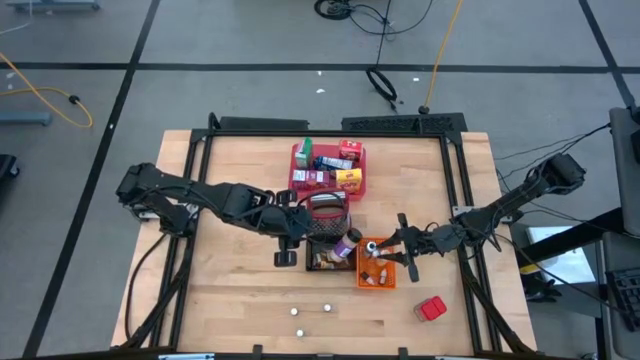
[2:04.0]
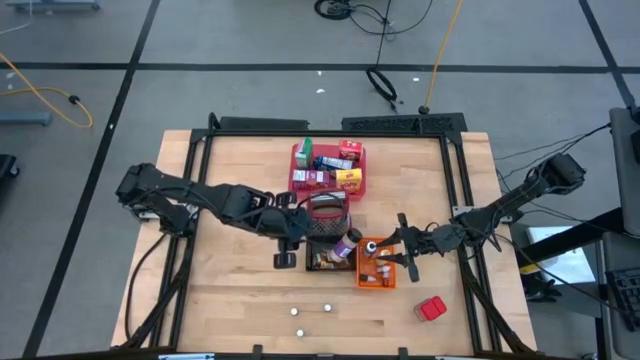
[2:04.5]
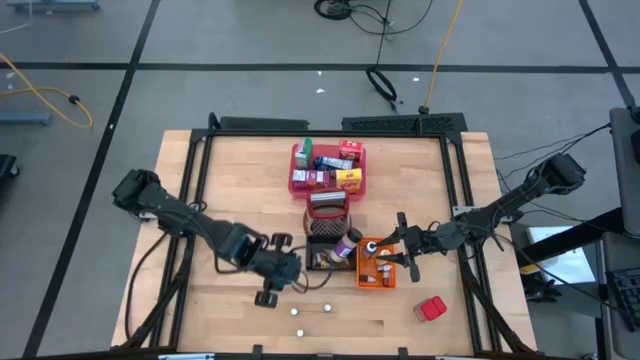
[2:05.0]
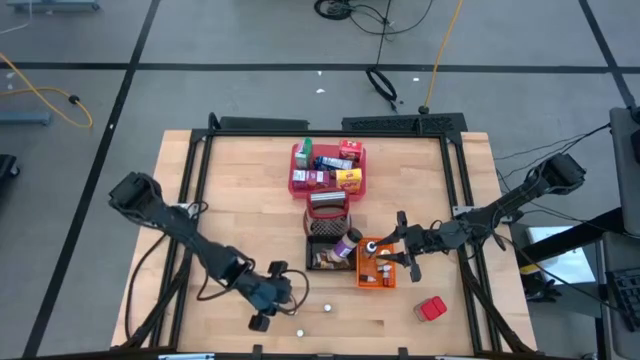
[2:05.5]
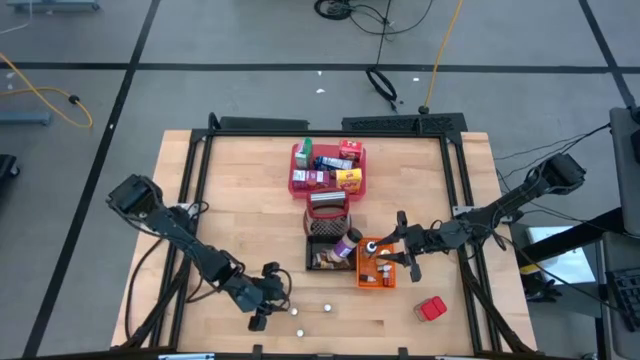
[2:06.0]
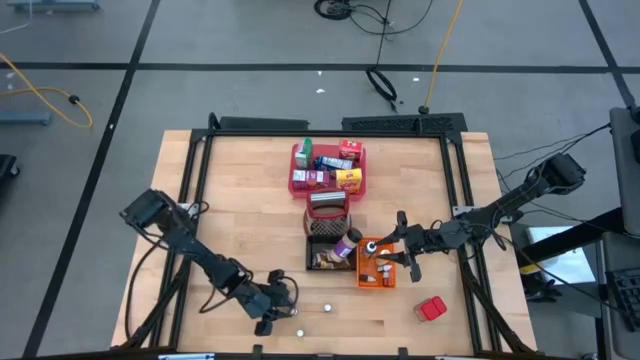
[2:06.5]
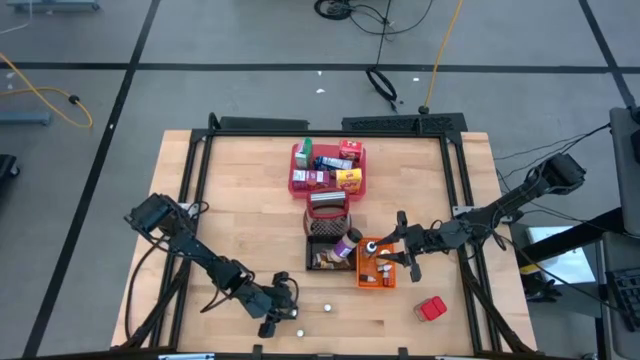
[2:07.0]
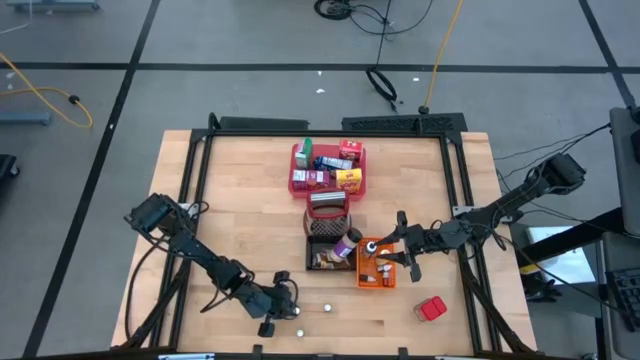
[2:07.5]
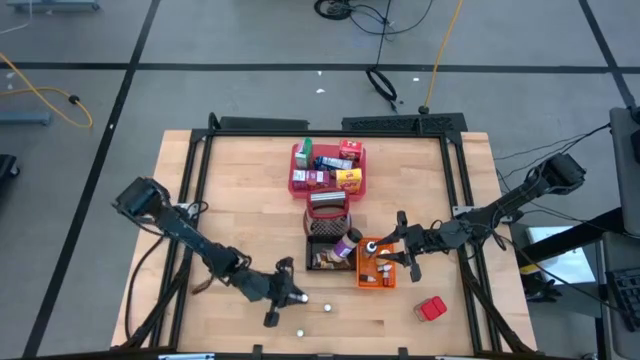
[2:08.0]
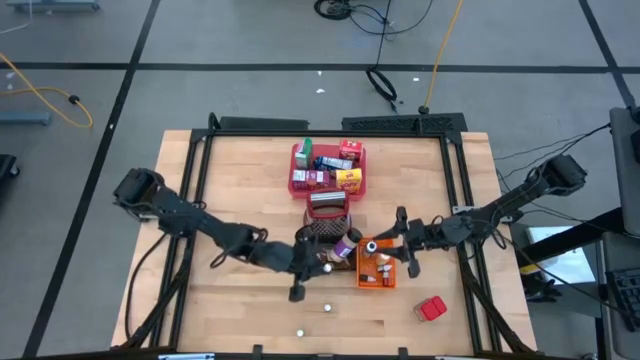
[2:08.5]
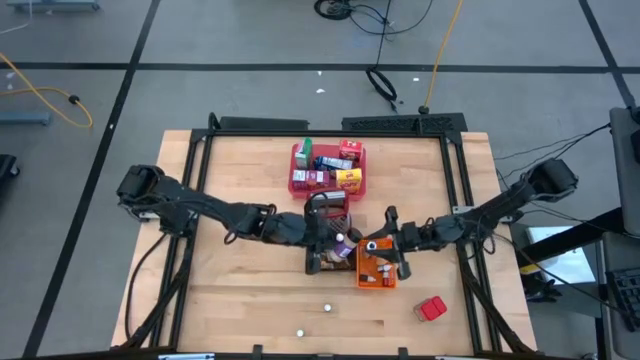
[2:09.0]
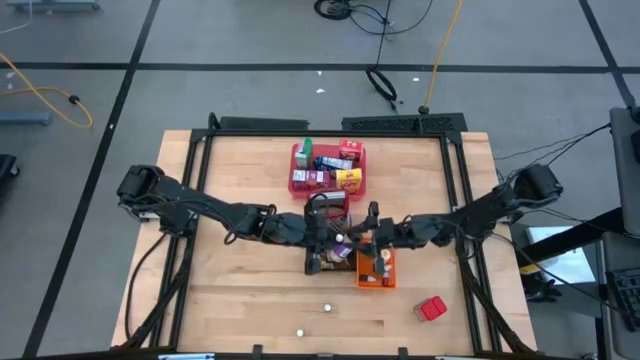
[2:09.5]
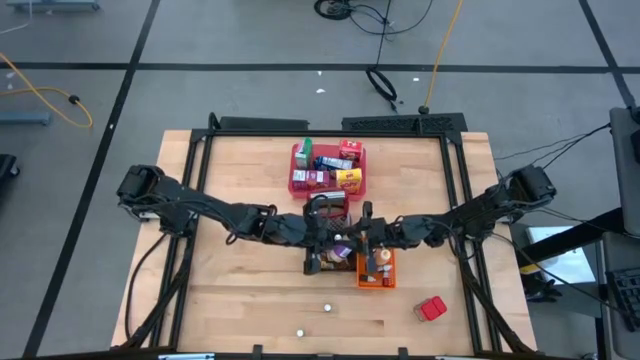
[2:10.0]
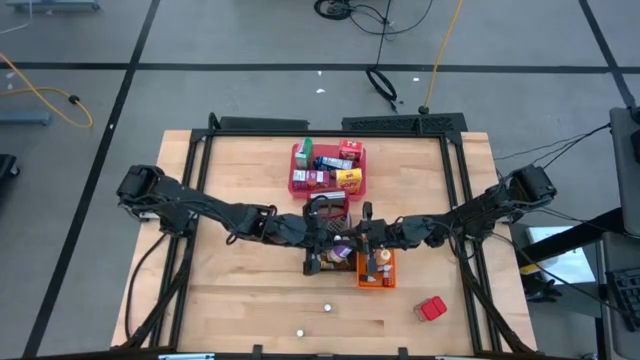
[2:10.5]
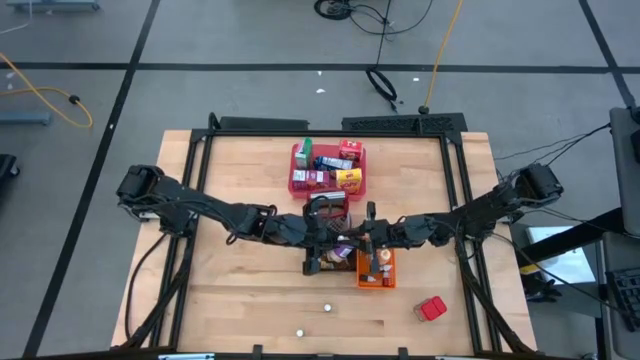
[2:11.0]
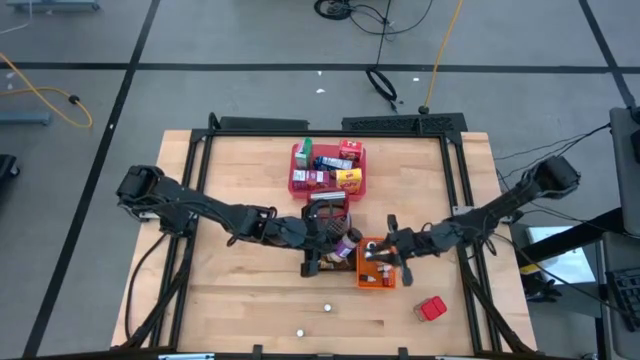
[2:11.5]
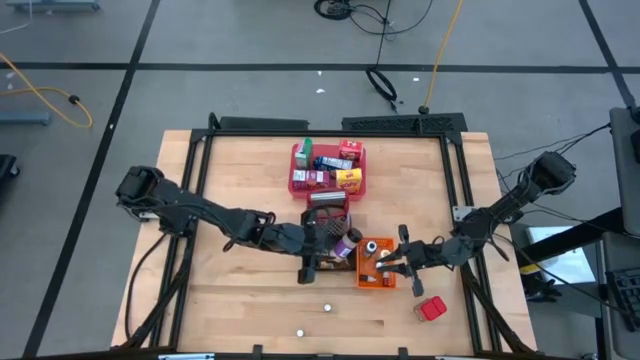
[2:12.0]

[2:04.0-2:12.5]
Task: Pick & Place Kitchen Items
Put the orange food coloring bottle into the orange bin

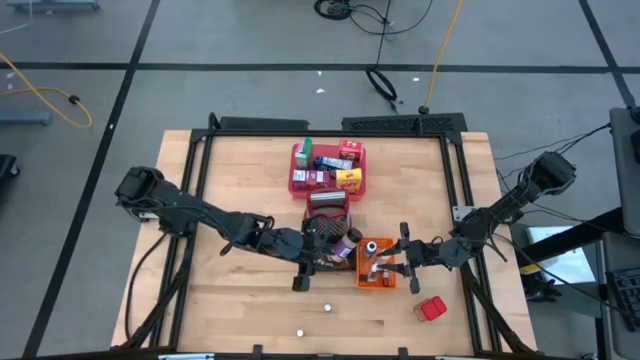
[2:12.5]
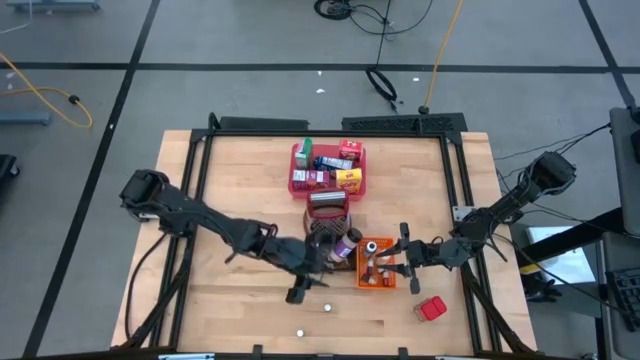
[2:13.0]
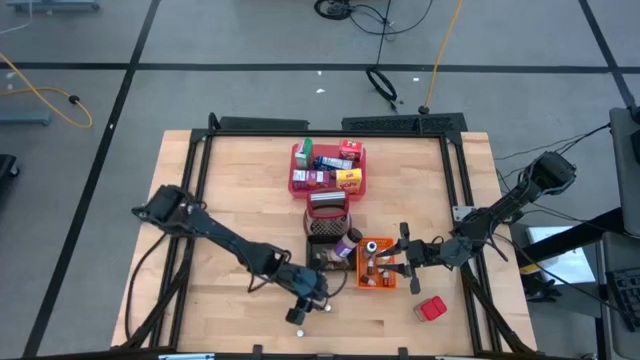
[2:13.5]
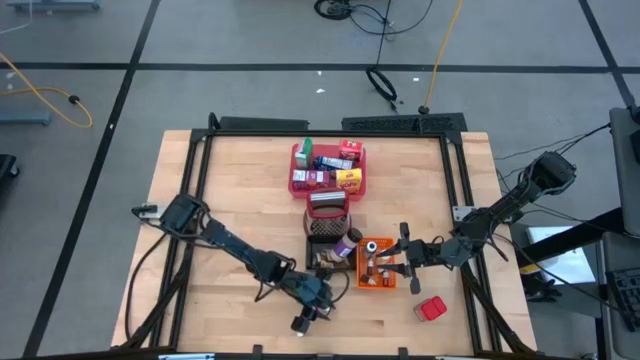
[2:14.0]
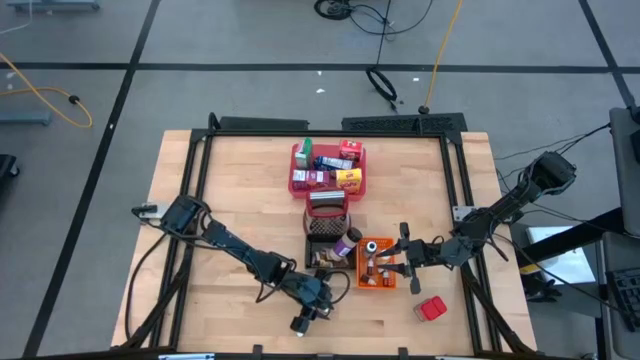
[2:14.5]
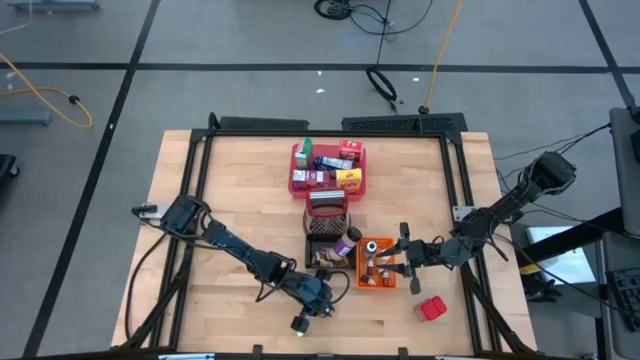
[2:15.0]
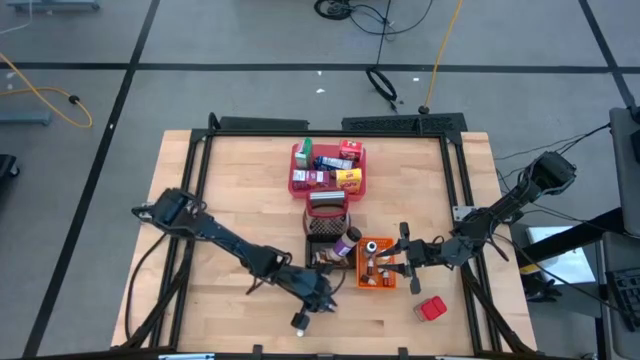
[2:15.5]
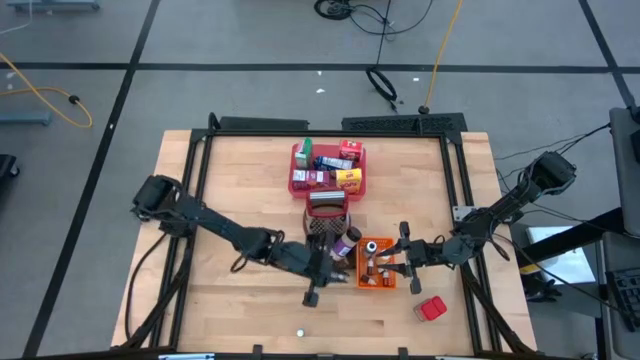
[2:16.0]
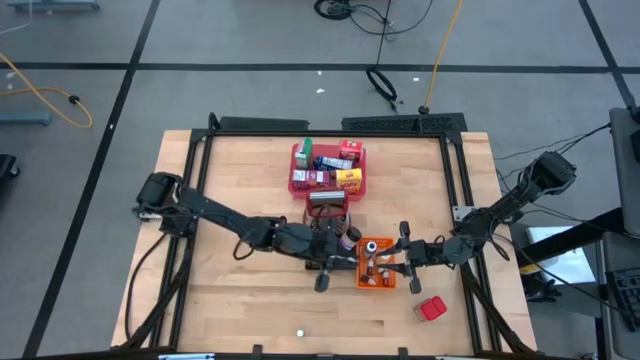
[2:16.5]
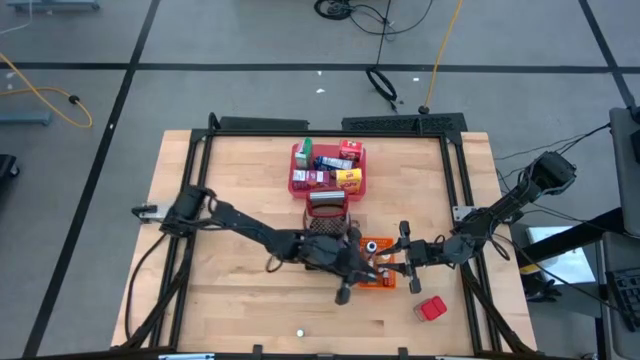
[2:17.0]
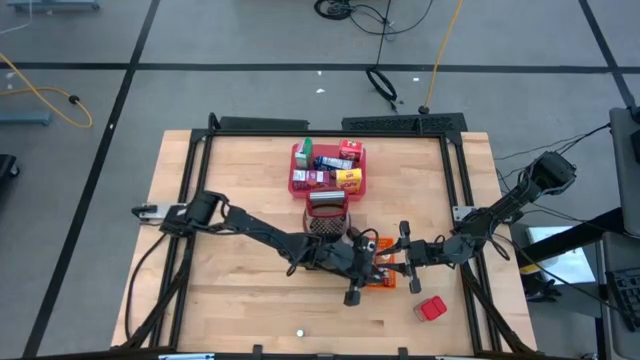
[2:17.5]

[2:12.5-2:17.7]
Put the green food coloring bottle into the orange bin

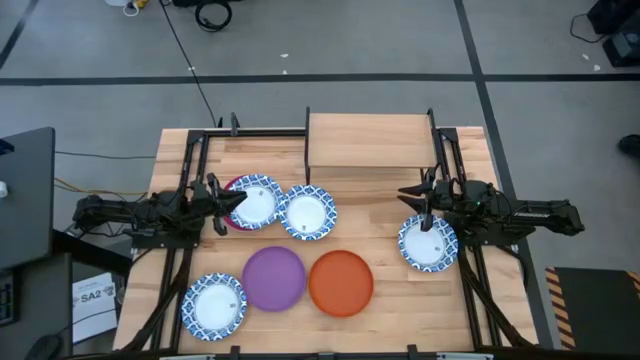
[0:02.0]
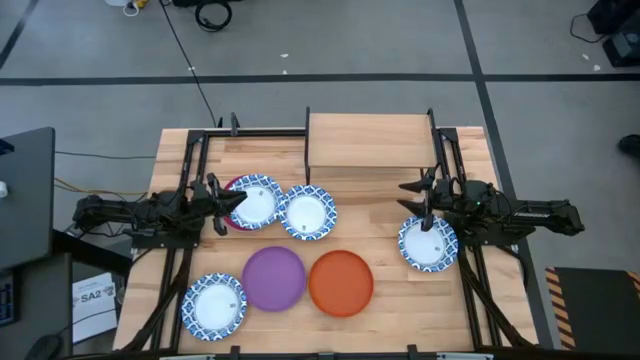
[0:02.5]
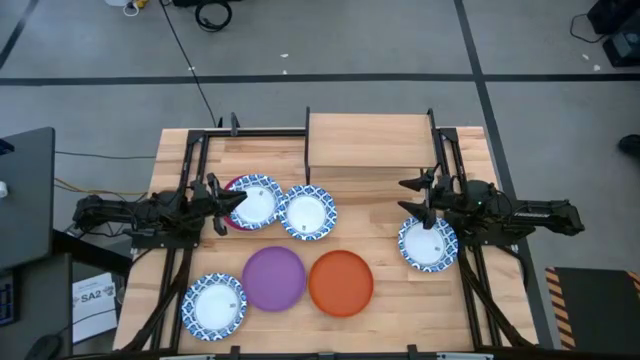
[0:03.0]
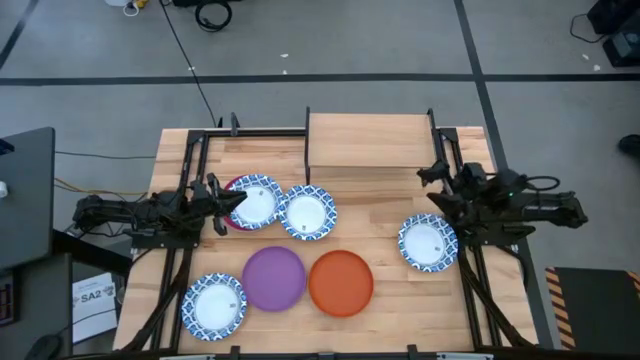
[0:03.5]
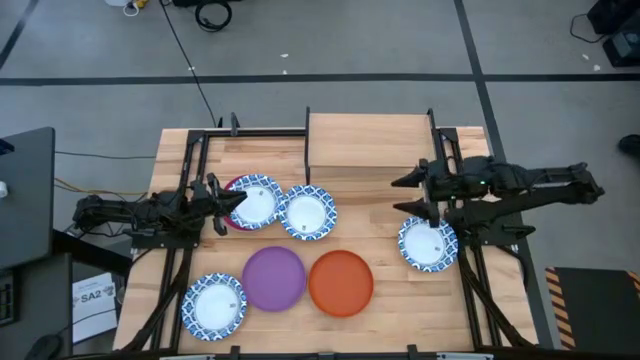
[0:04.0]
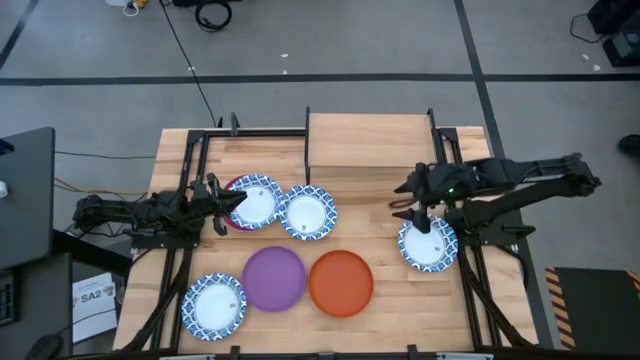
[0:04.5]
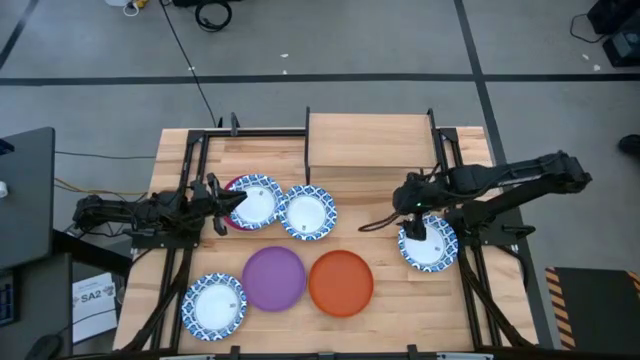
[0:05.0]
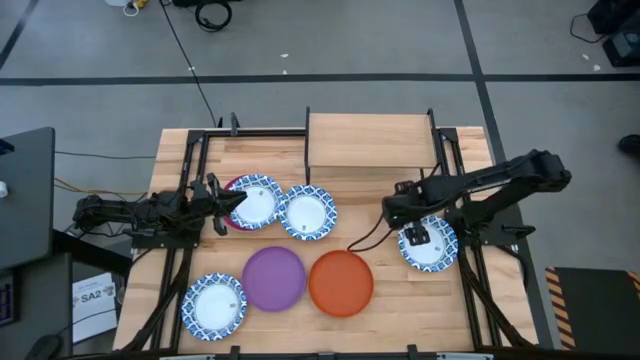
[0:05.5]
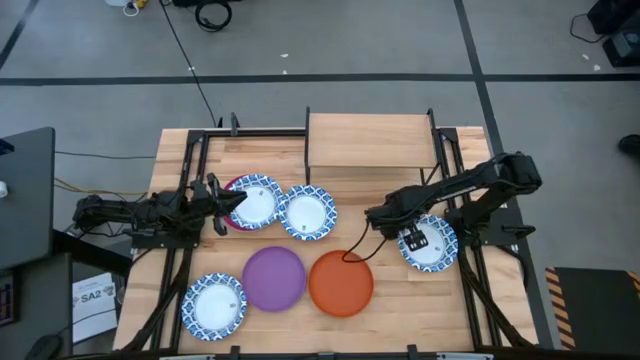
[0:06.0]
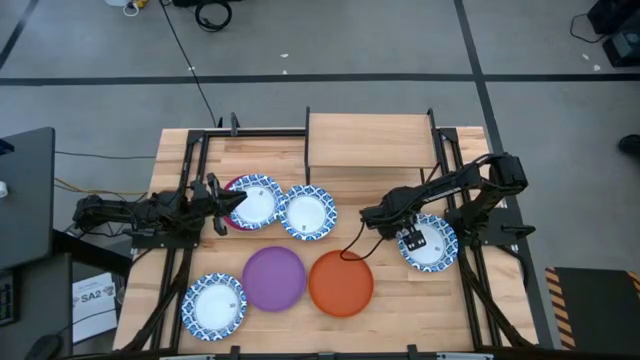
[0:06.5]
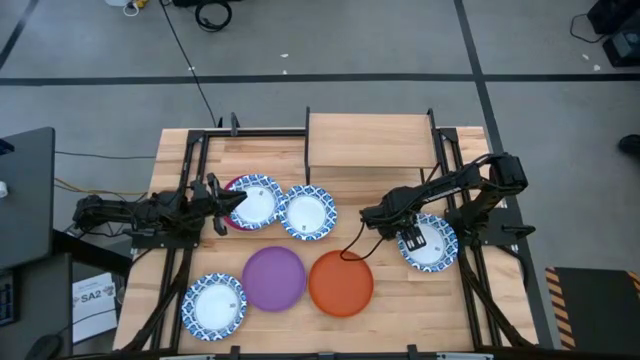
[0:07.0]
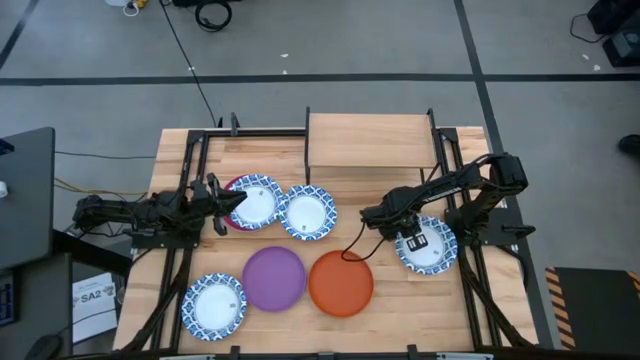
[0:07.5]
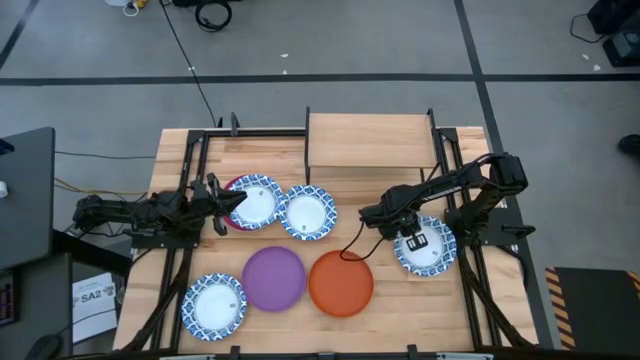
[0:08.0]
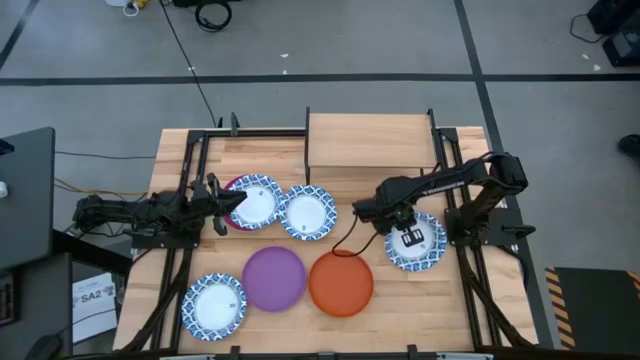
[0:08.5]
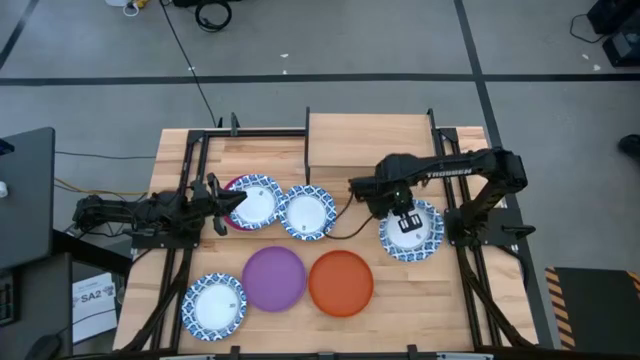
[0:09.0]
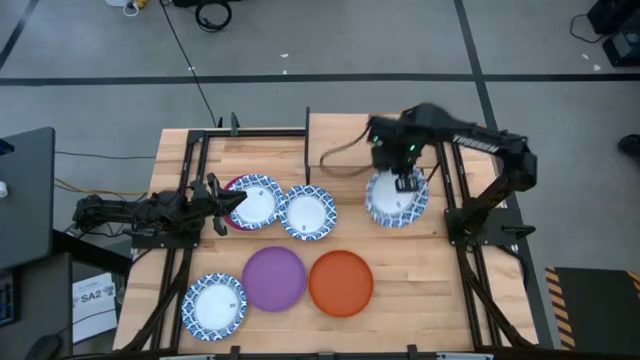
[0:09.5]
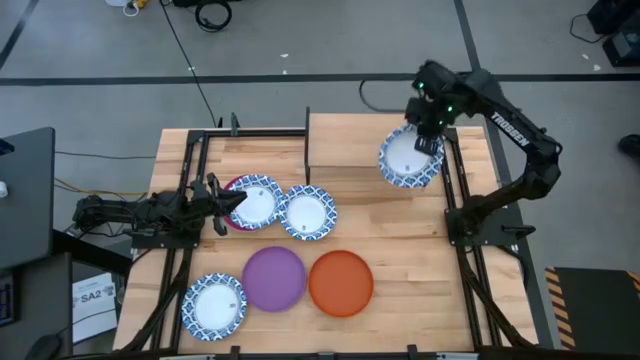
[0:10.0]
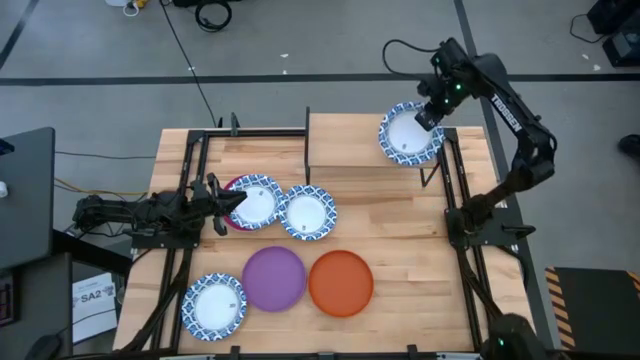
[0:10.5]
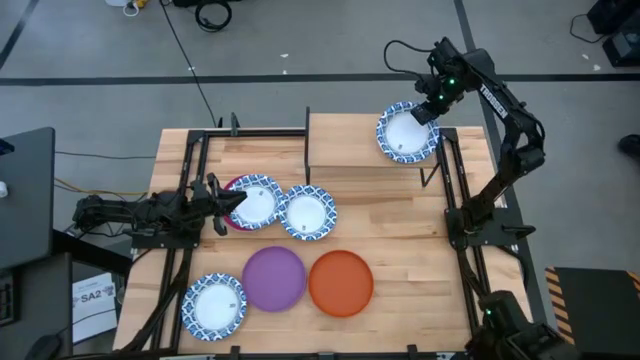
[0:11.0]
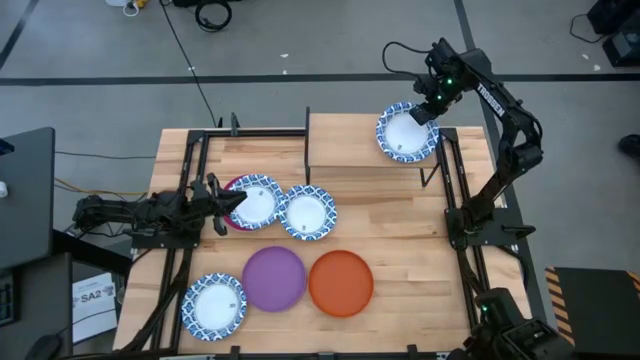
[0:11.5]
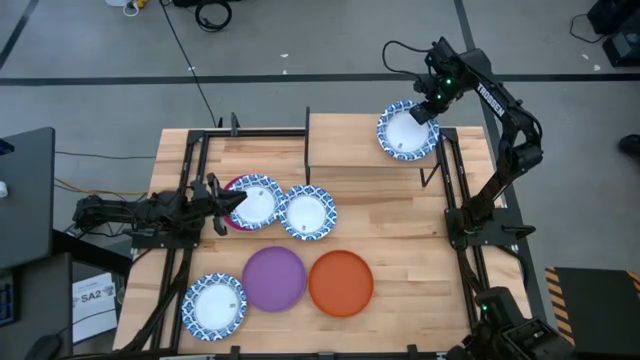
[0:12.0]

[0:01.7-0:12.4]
Task: Place and stack plates onto a shelf
Put the white patterned bowl on the shelf
